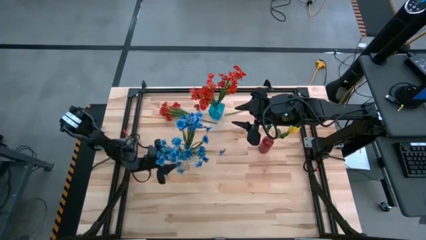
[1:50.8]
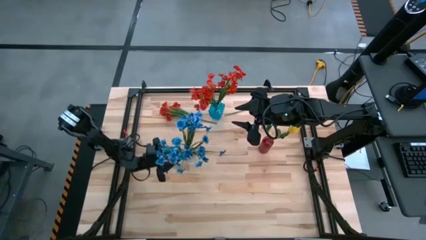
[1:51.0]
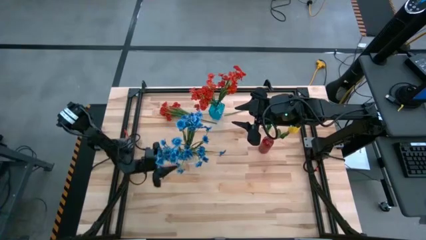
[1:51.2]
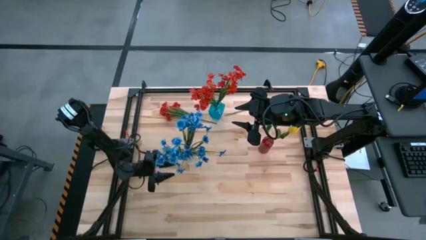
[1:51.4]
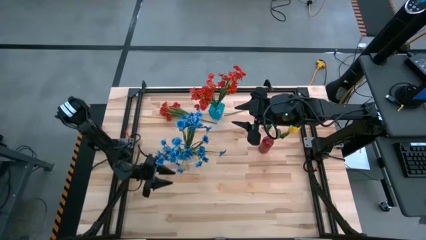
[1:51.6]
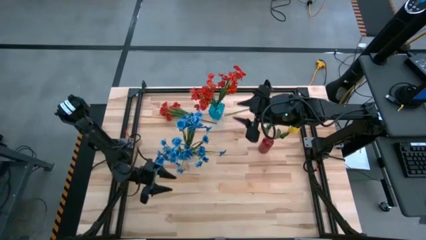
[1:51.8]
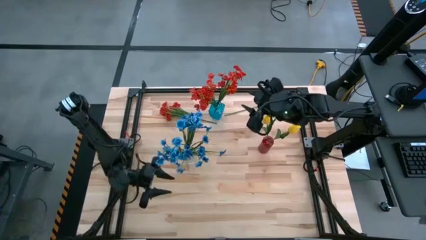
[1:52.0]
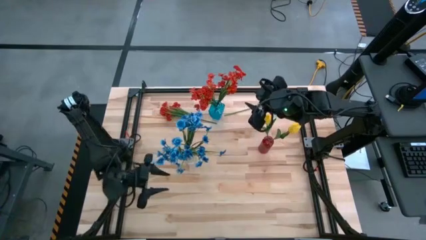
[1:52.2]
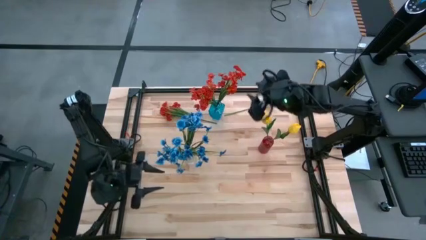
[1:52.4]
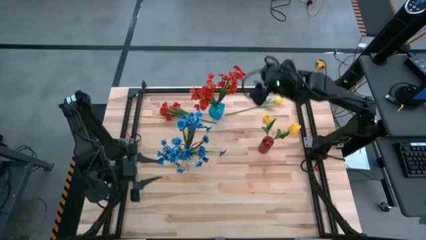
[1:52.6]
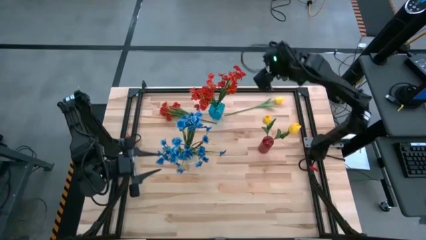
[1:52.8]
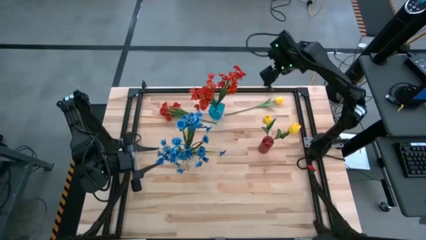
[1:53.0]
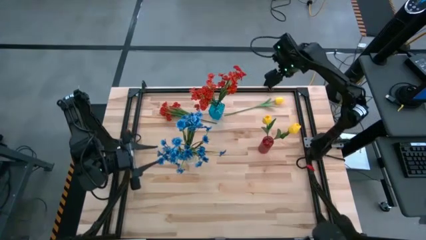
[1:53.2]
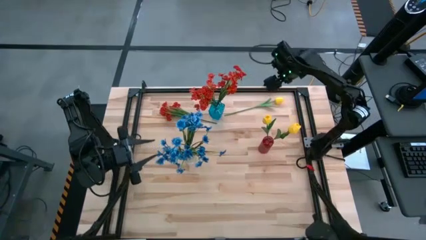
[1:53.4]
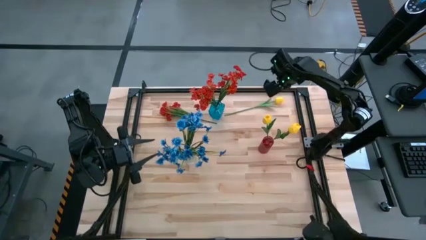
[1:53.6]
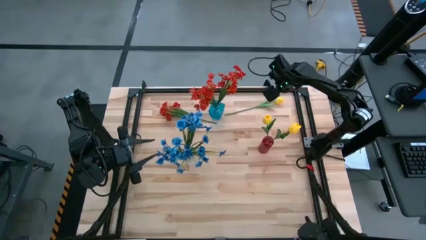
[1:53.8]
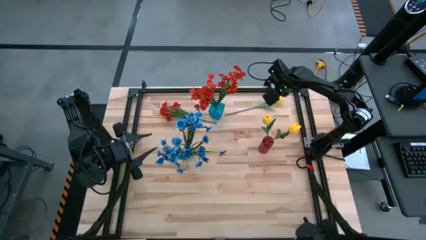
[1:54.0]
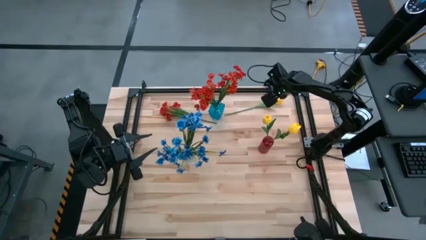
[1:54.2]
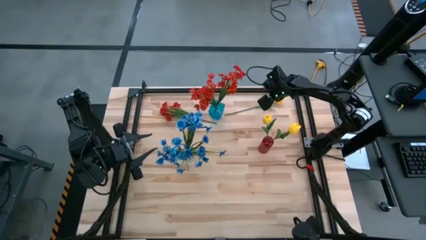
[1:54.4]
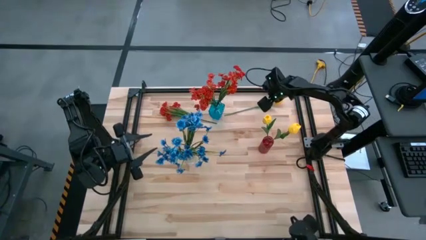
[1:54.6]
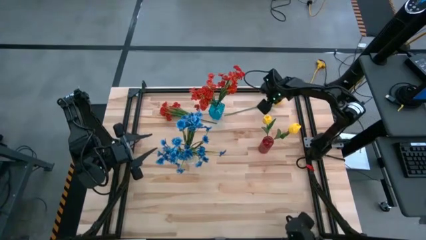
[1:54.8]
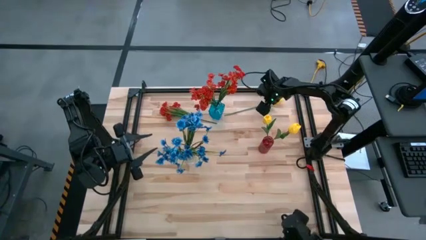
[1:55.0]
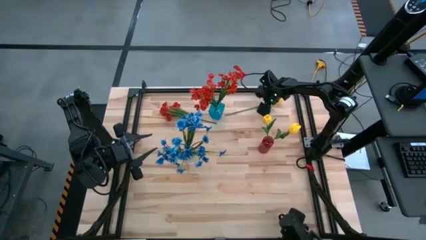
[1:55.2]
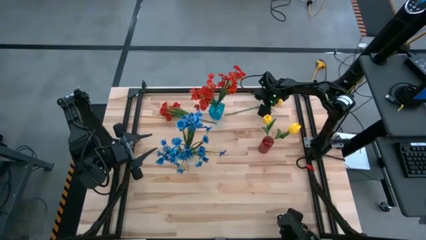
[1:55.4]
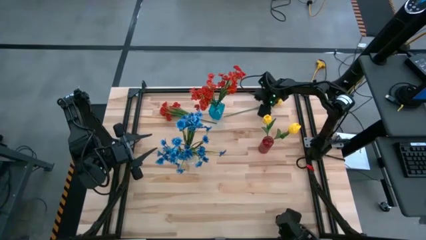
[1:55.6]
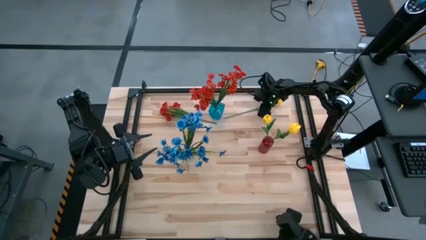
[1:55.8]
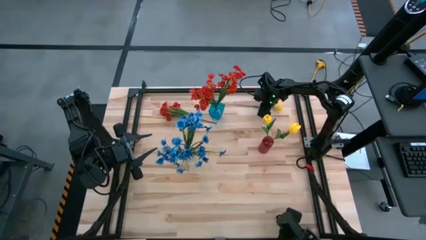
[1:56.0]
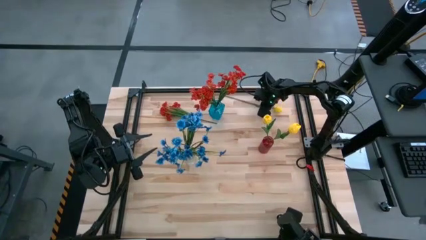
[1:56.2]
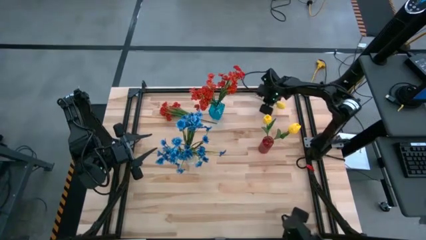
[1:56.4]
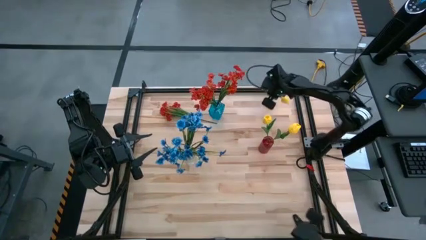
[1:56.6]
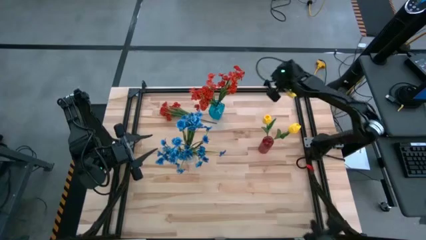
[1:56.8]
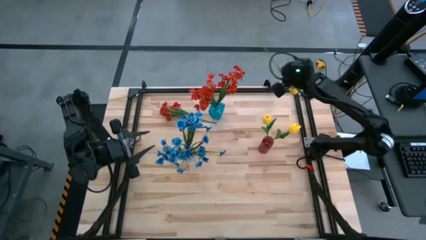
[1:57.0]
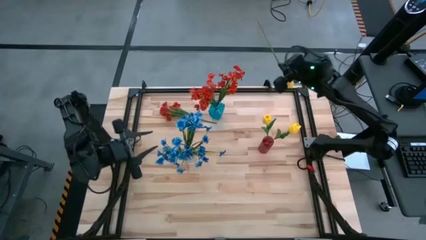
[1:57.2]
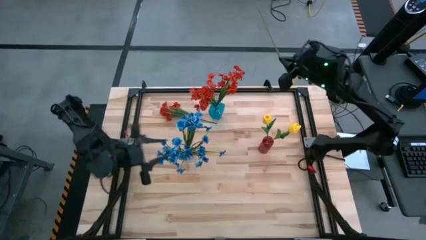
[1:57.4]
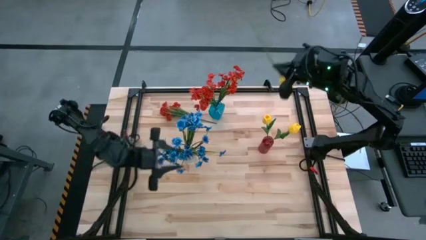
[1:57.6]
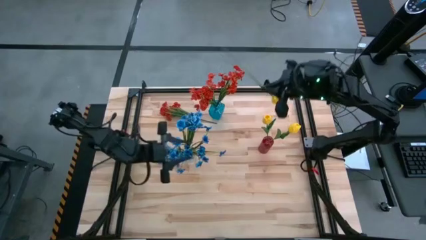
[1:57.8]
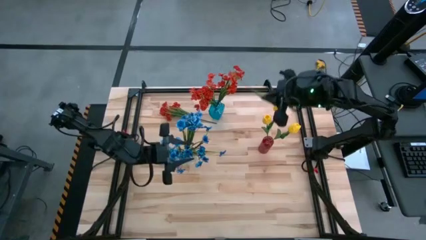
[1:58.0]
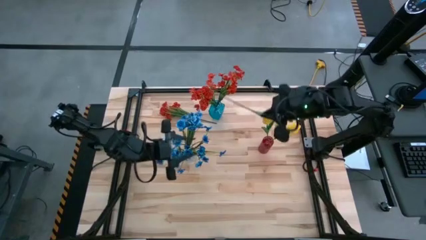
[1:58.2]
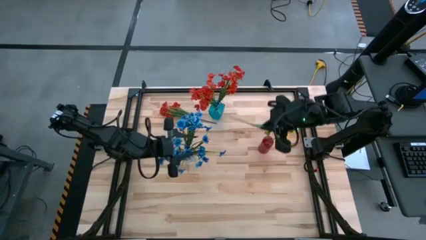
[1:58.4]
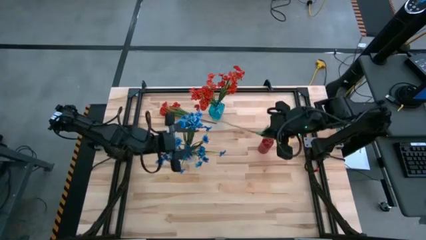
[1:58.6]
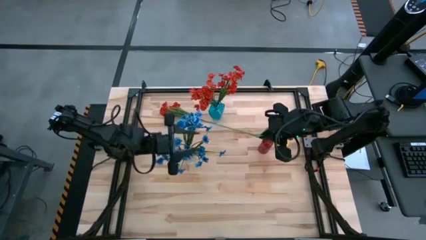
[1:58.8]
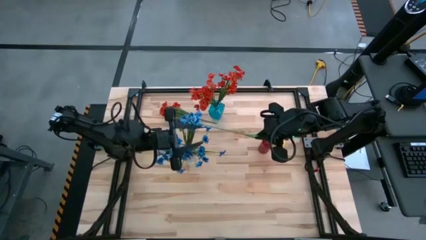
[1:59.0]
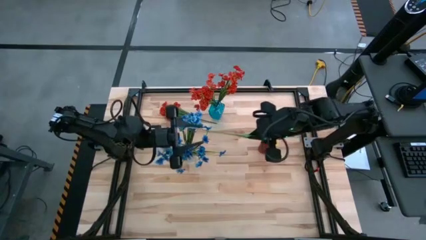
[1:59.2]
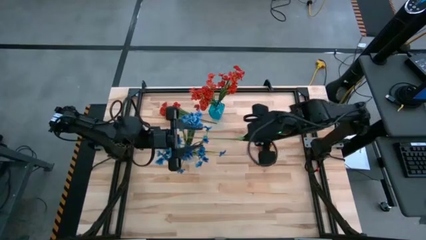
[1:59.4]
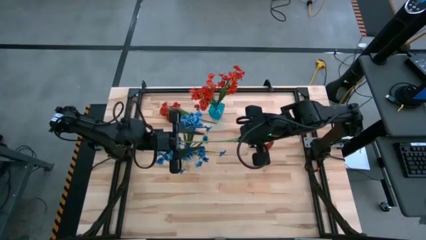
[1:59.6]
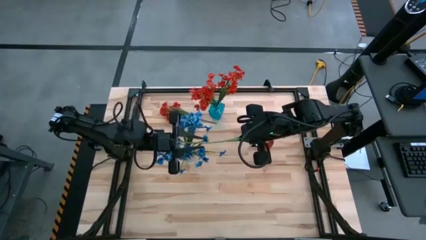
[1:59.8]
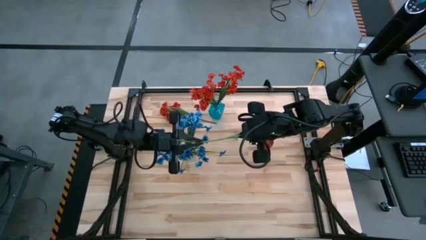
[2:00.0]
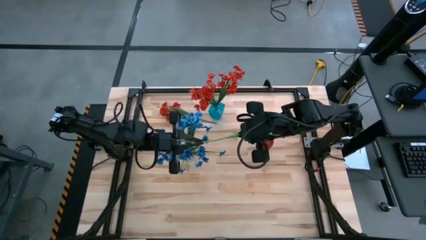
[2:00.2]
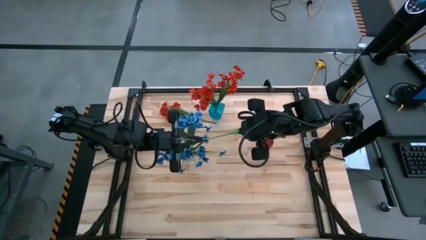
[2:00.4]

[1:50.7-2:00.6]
Task: Sort flowers into vase by color
Put the yellow flower into the red vase
